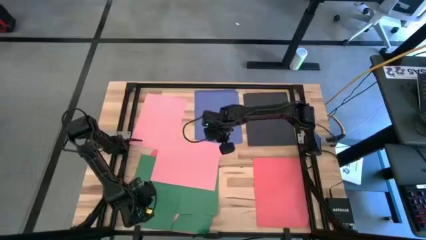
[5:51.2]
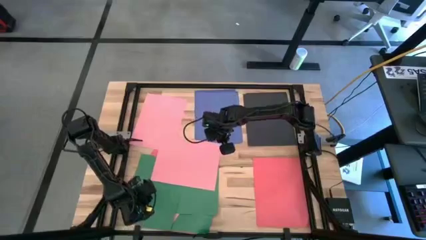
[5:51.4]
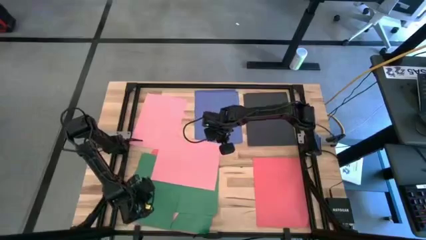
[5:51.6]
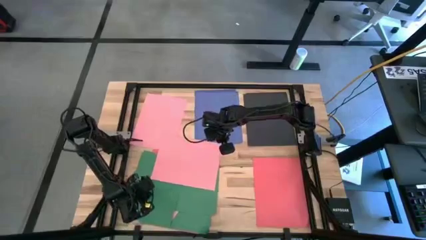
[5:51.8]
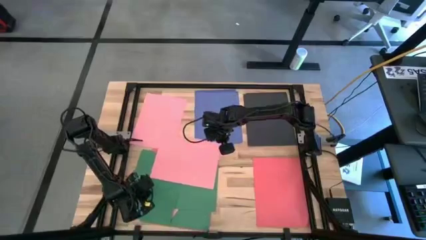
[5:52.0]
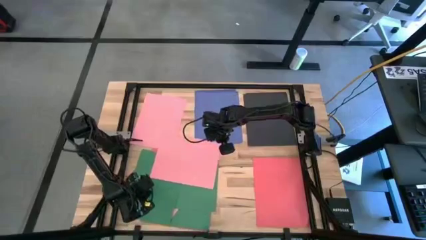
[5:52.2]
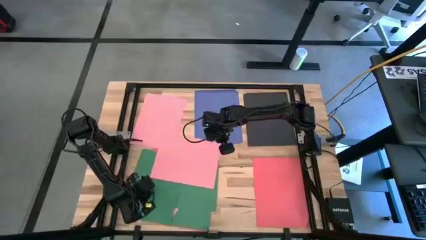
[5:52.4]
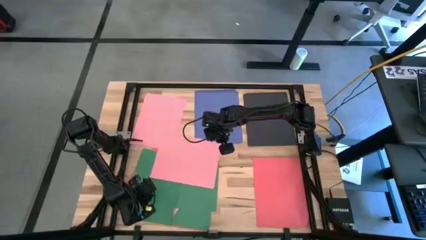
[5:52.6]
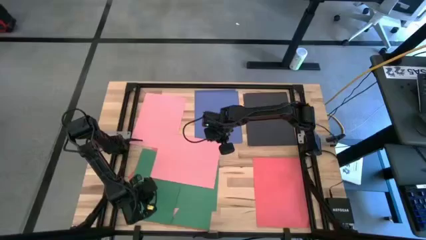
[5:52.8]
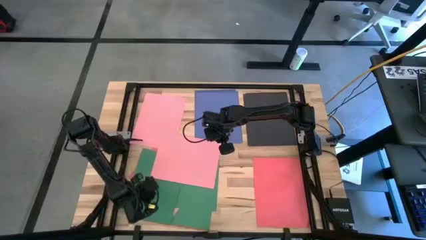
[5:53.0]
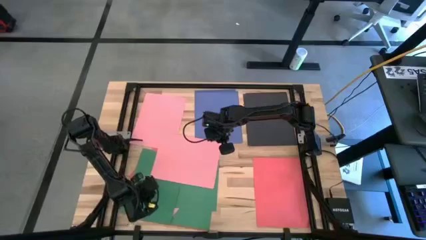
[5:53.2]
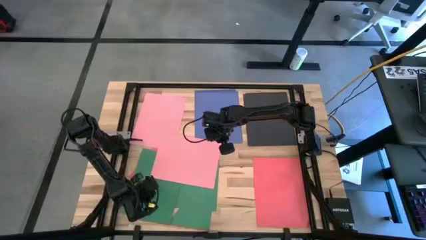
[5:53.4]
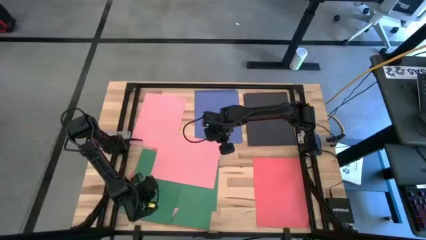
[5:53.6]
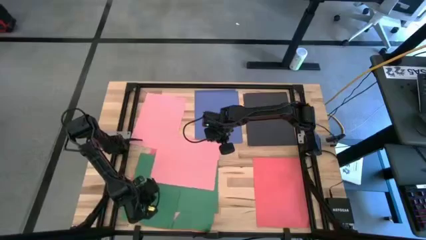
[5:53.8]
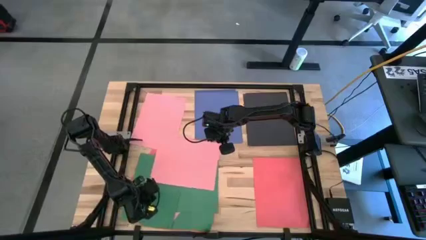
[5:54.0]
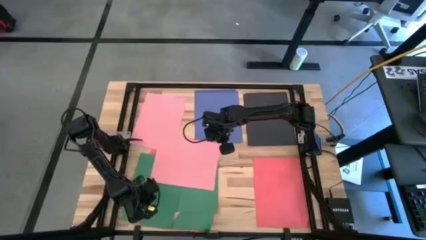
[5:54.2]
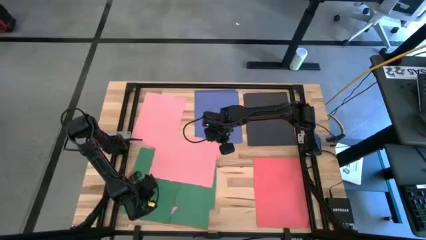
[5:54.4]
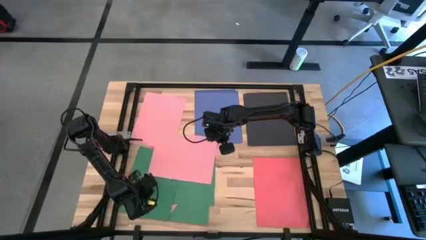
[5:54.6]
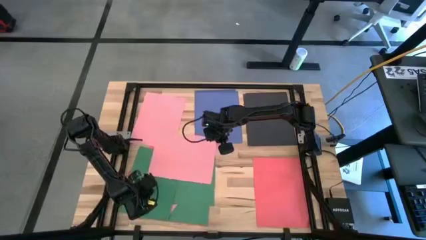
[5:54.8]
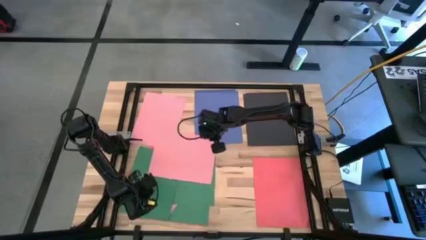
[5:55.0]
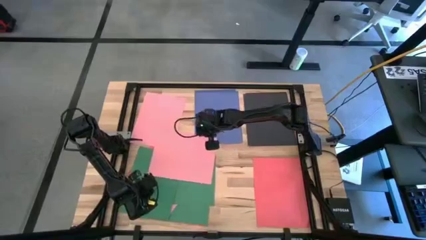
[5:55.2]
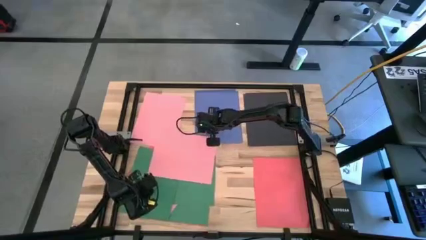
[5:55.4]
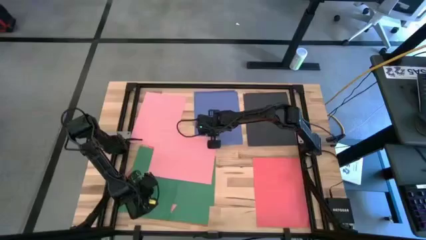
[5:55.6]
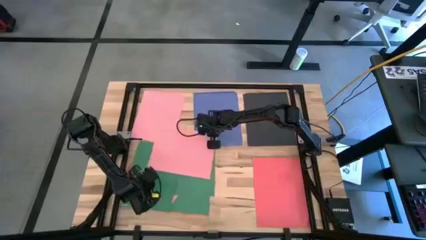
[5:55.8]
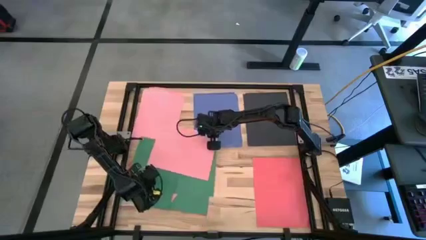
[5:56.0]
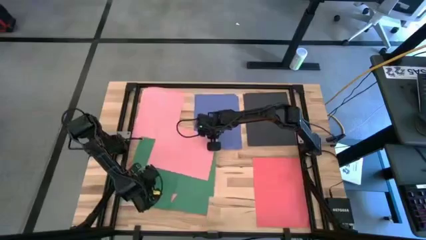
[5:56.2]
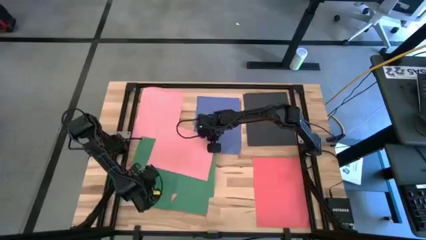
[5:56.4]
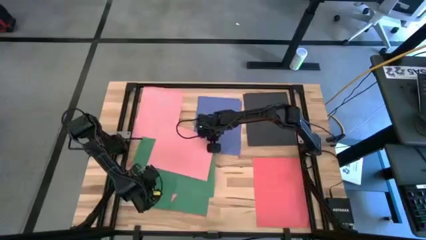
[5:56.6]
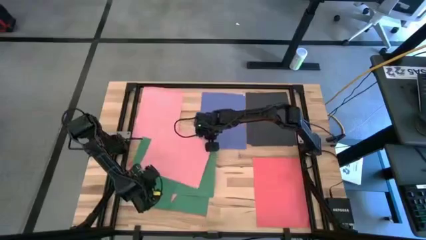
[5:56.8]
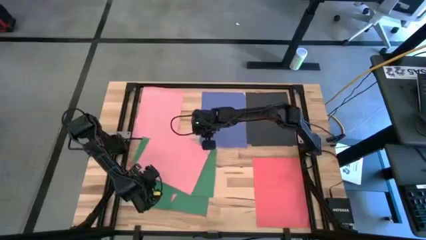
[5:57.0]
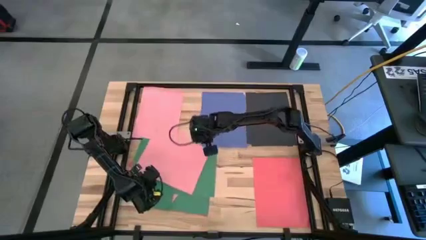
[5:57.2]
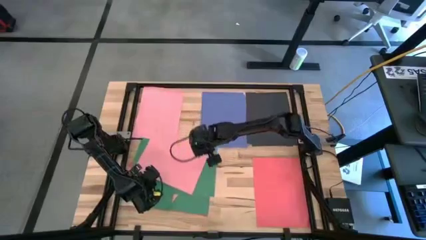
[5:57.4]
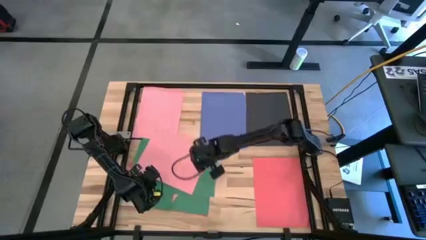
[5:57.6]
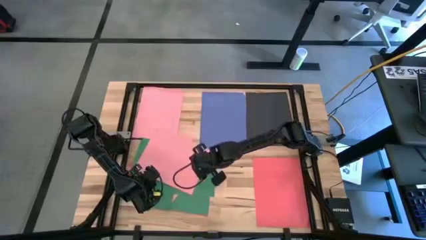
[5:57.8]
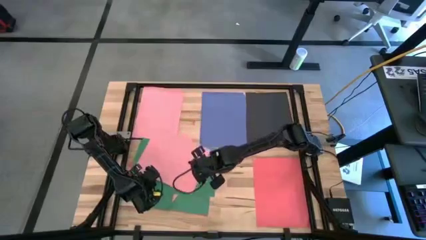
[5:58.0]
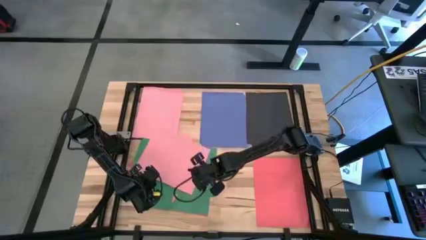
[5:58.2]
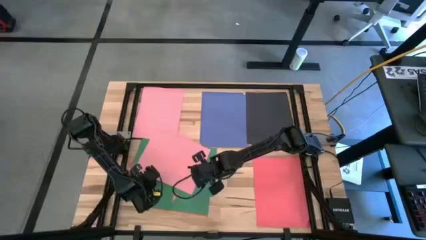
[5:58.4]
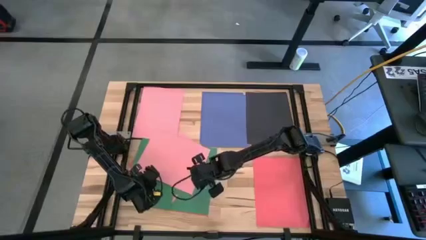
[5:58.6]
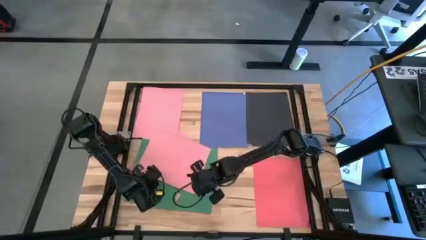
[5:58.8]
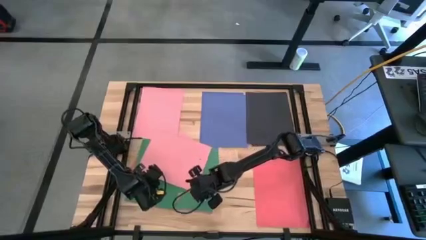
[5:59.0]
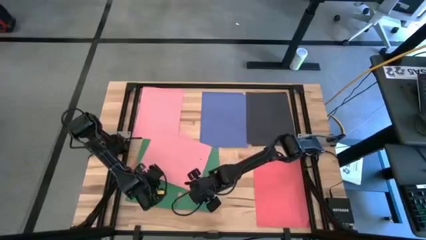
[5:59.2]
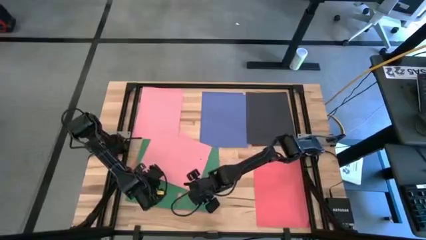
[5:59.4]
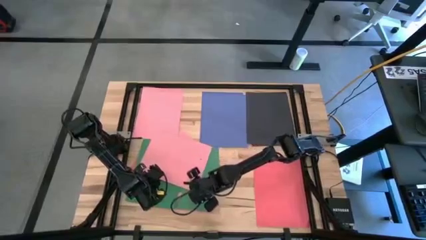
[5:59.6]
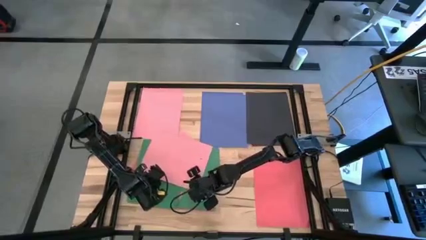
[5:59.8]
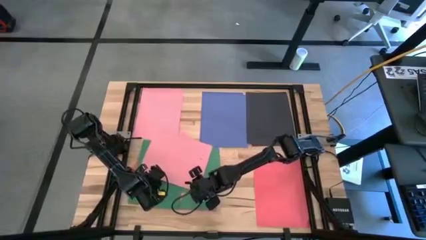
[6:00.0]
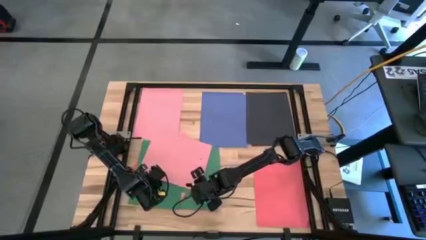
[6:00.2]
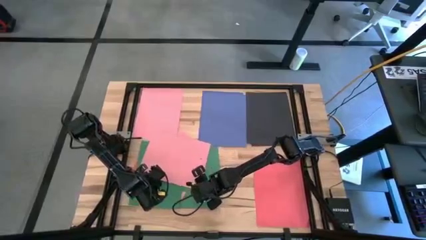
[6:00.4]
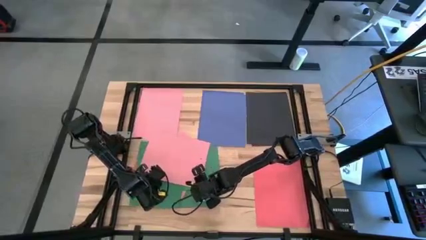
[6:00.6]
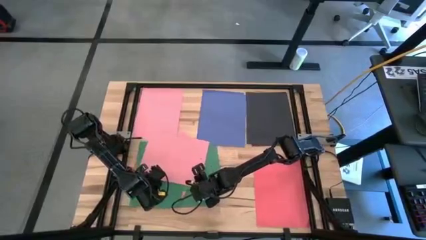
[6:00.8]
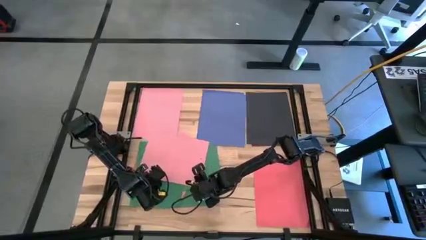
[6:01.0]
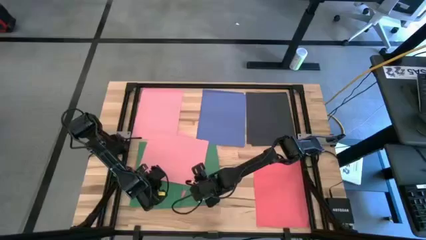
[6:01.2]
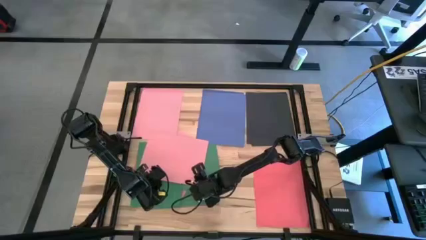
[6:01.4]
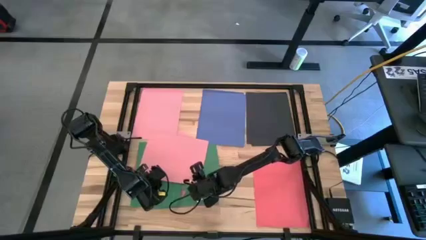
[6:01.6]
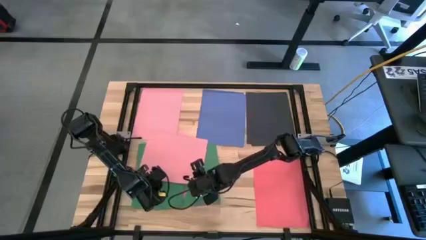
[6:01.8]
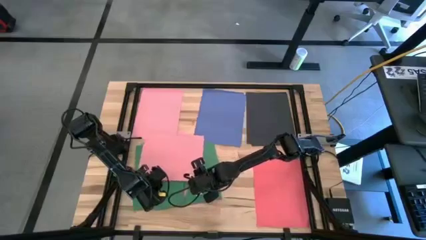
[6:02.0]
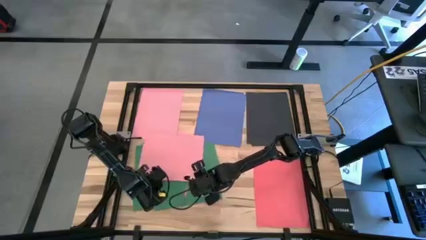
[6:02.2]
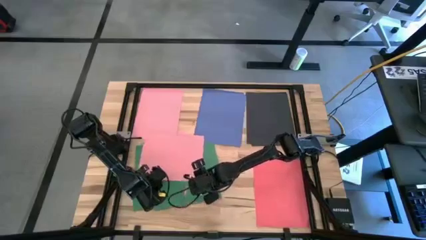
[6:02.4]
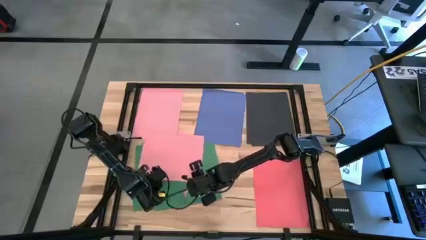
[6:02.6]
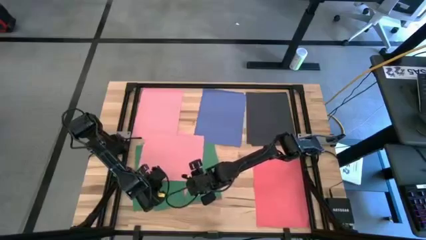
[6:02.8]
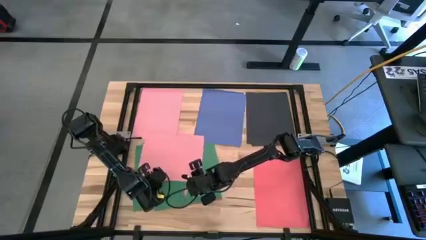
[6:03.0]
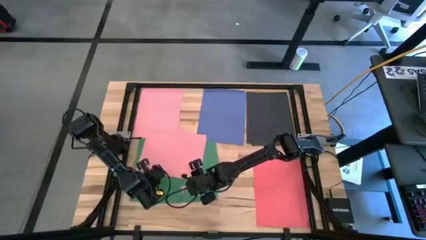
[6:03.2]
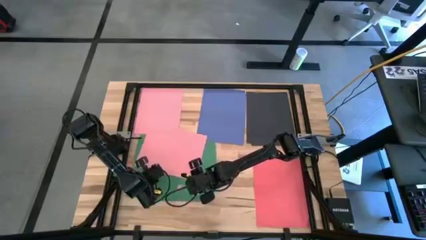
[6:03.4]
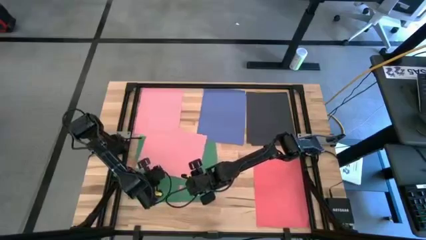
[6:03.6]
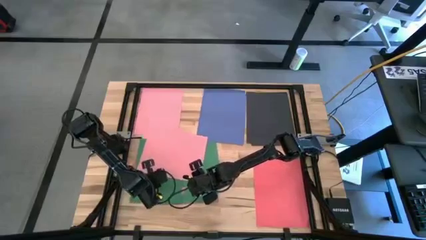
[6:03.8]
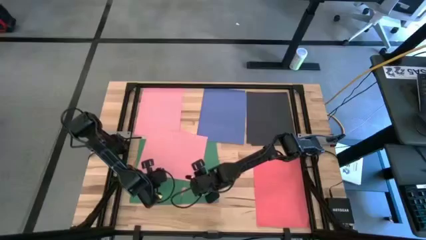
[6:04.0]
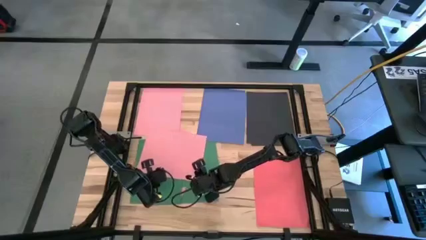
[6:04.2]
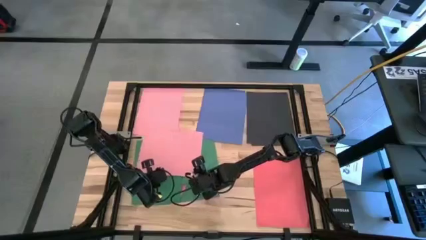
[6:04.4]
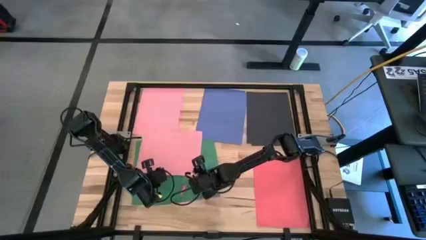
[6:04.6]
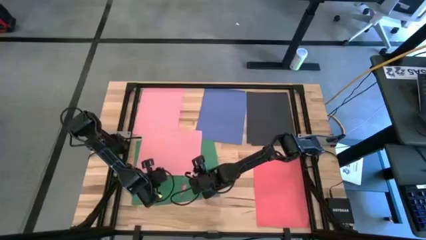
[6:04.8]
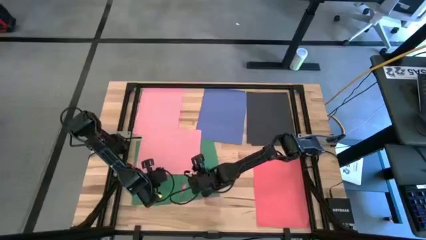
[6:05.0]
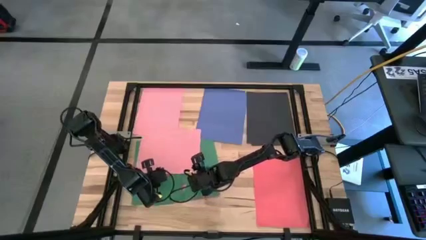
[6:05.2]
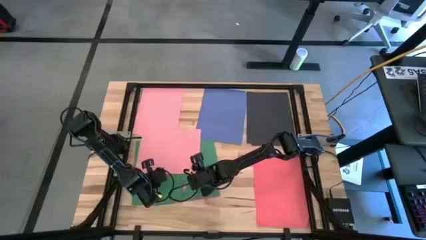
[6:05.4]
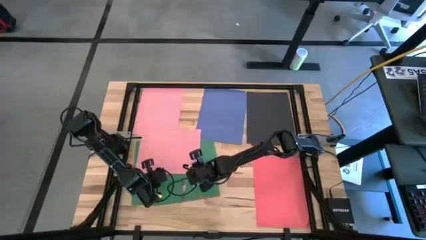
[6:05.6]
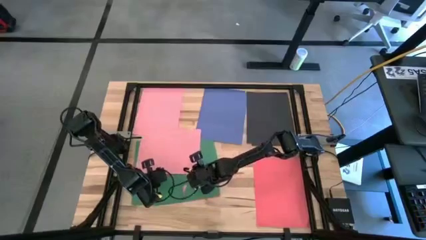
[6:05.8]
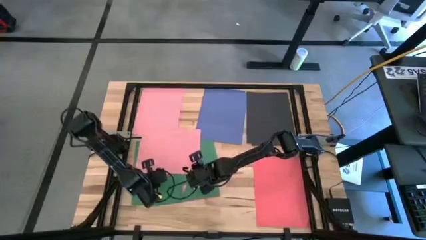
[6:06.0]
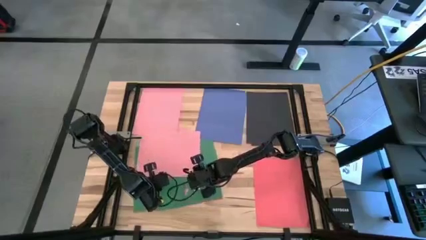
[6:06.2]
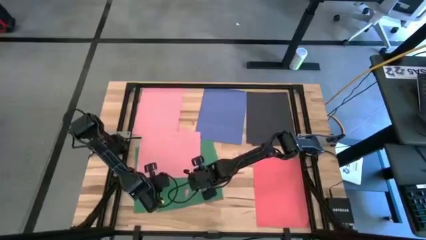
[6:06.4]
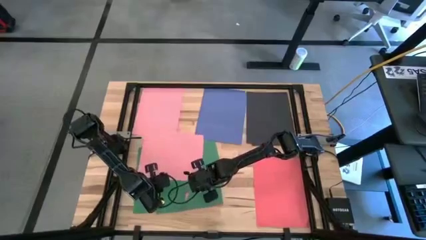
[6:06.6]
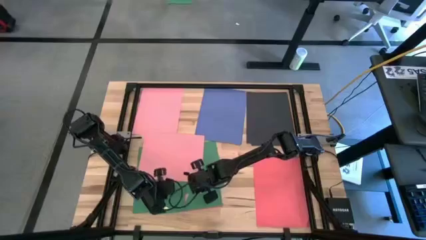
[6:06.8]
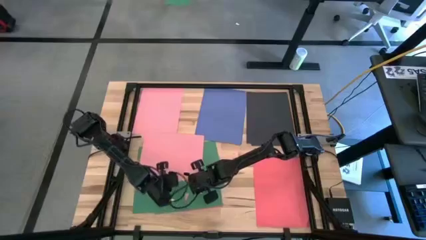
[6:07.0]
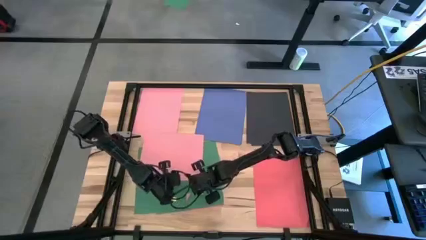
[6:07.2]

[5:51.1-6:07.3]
Task: Organize paper
Stack the pink paper on top of the other pink paper on the table
